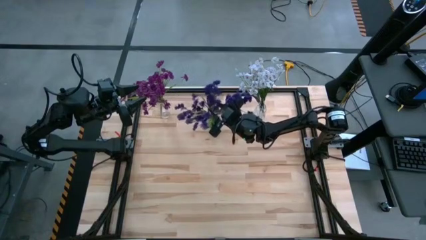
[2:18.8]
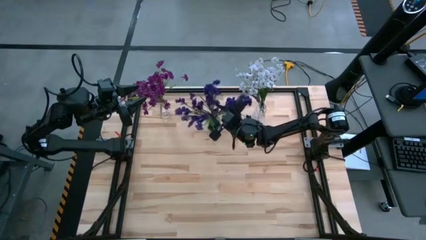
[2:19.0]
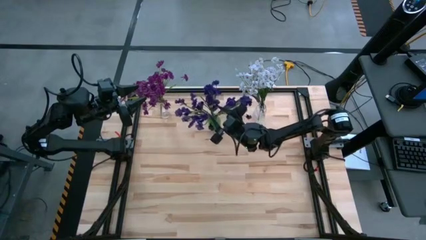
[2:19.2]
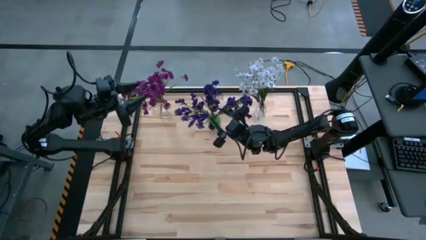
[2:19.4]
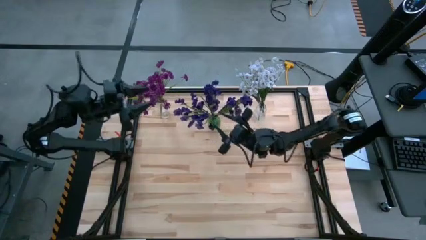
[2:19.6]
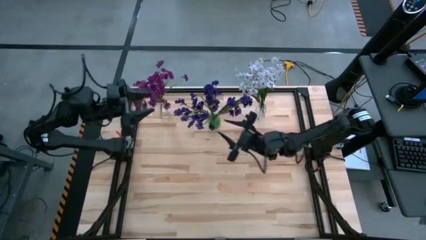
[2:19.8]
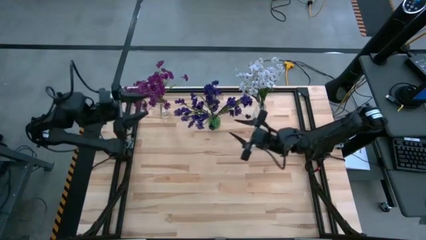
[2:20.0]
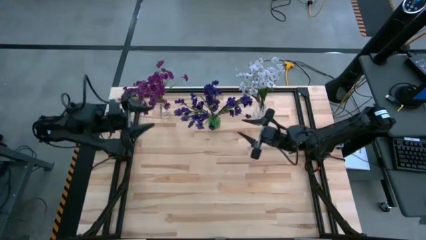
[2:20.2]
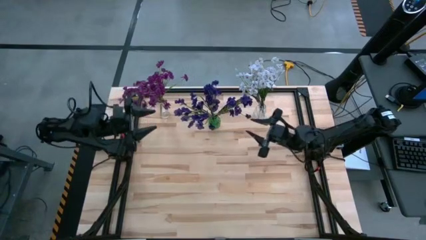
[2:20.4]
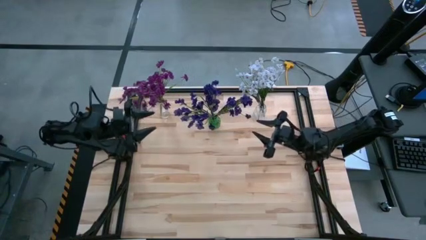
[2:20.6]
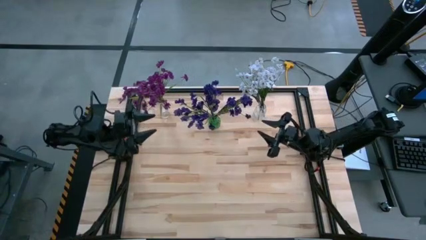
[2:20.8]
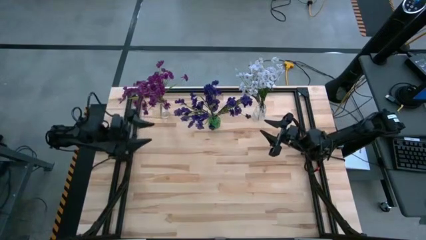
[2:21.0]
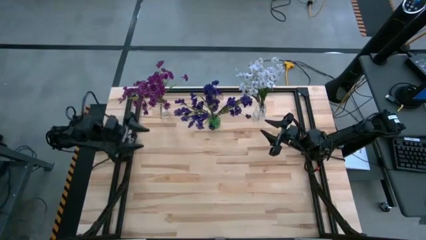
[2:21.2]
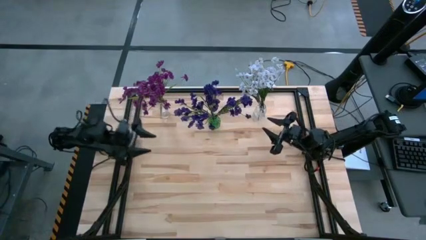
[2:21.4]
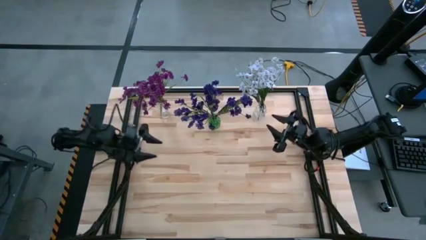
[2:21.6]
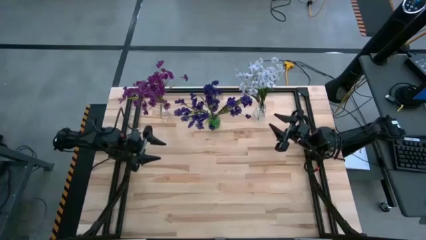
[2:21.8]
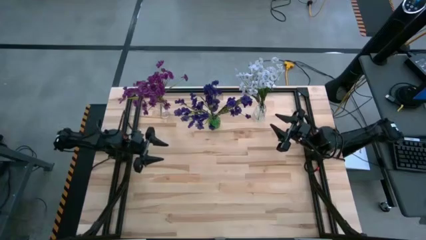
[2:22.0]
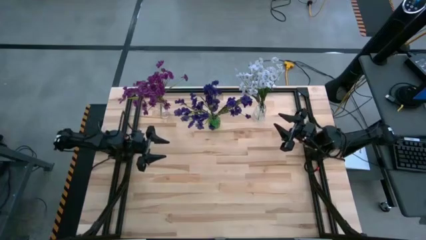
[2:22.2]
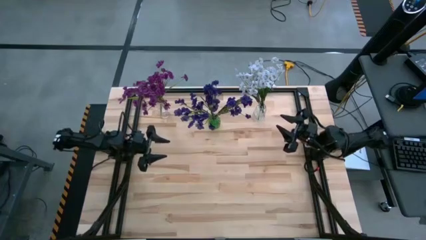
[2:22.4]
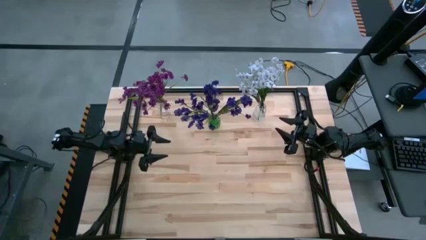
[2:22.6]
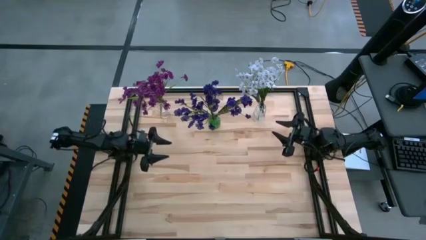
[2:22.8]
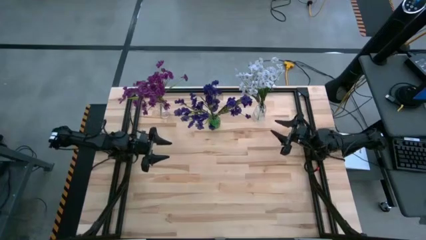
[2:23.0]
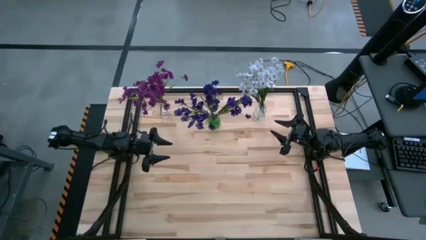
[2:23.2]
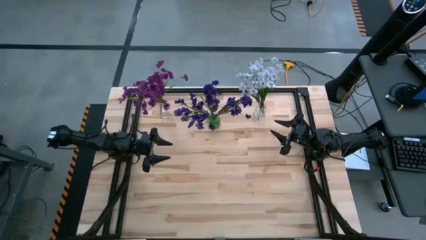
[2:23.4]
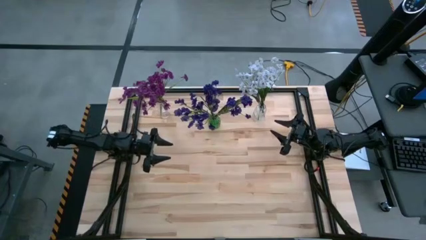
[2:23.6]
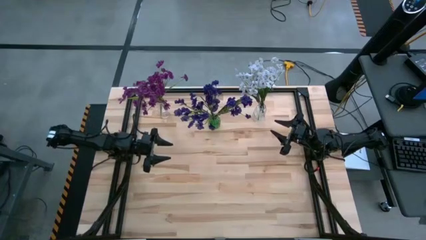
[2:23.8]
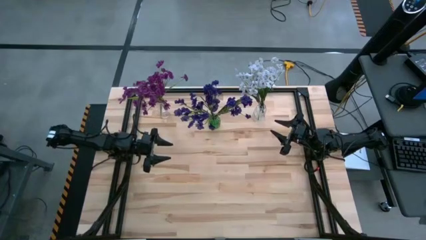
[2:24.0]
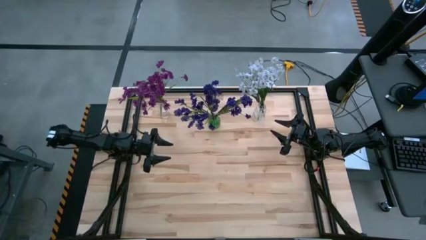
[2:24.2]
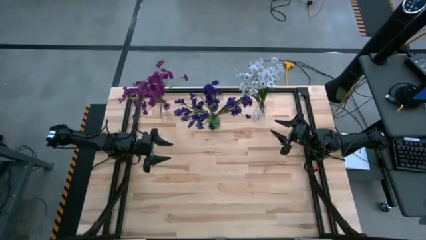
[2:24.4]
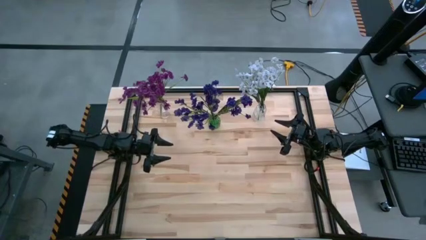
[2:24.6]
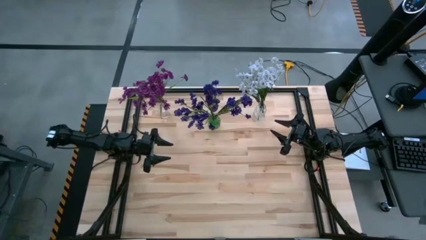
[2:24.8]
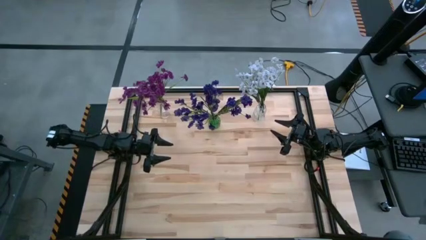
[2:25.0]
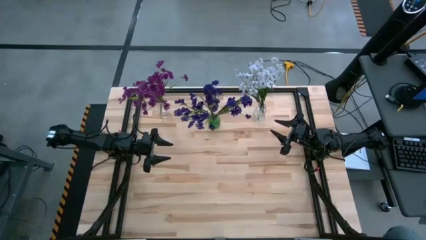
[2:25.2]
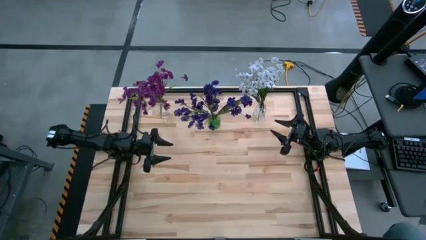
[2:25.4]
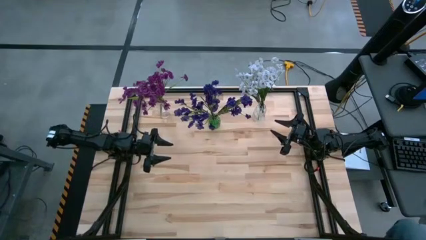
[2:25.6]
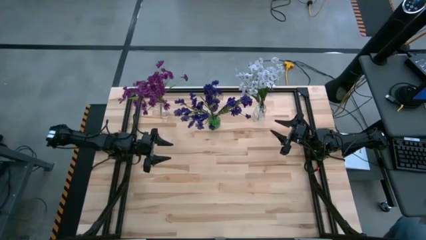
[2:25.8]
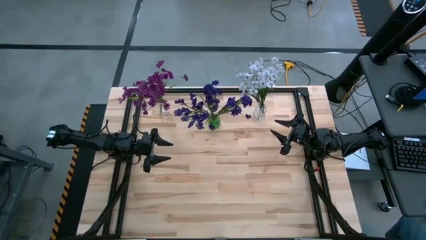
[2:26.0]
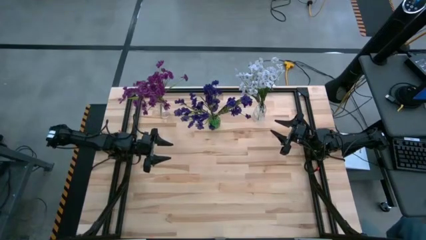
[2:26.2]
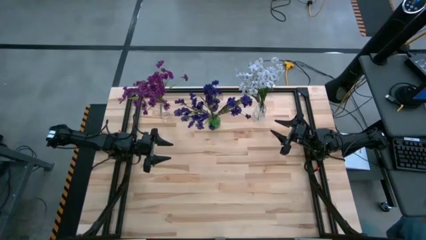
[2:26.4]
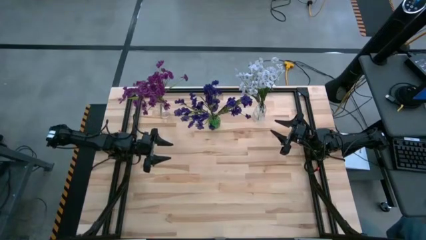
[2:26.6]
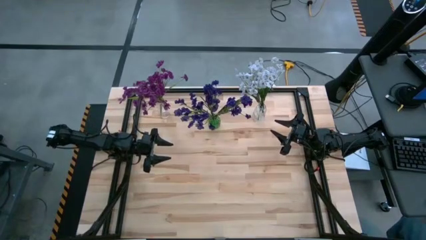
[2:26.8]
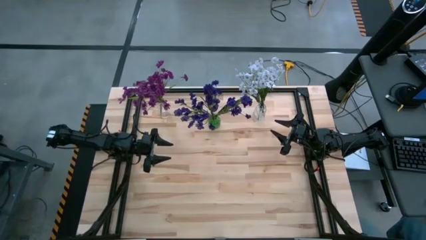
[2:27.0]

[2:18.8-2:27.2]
Task: Sort flowers into vase by color
Return to Home Position
